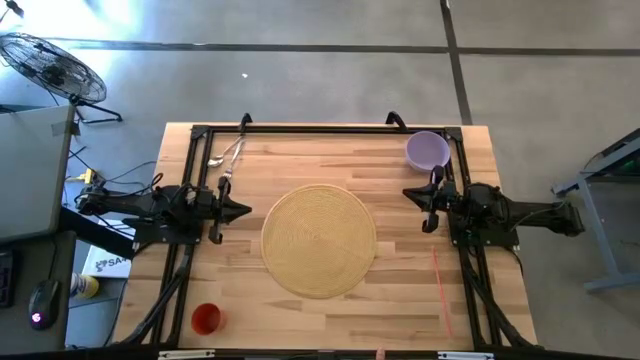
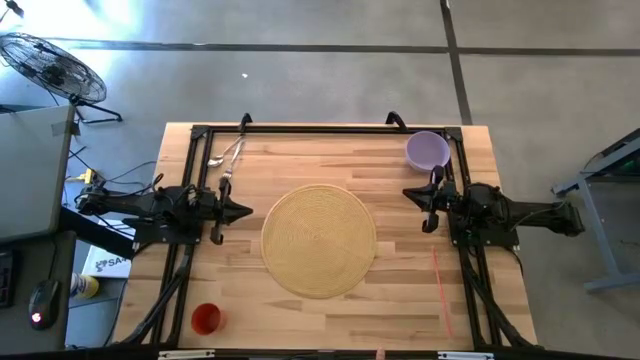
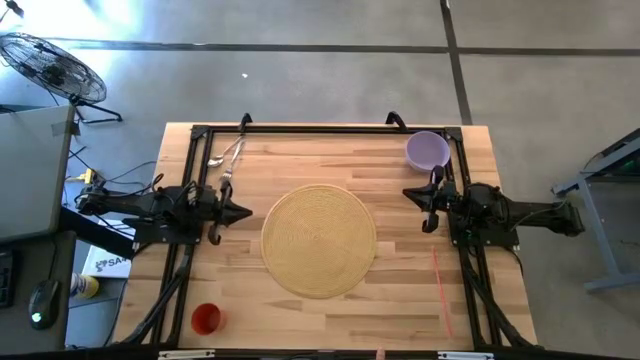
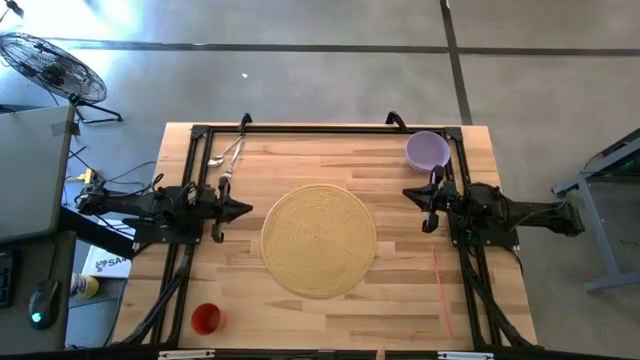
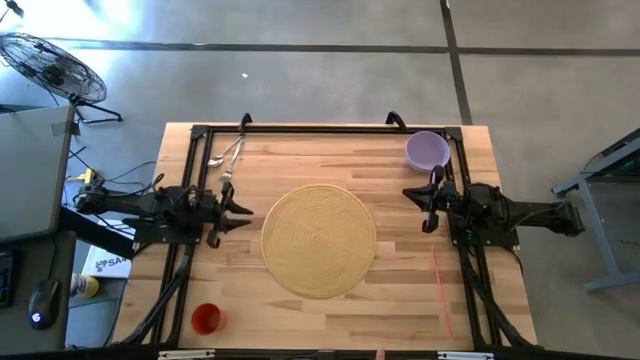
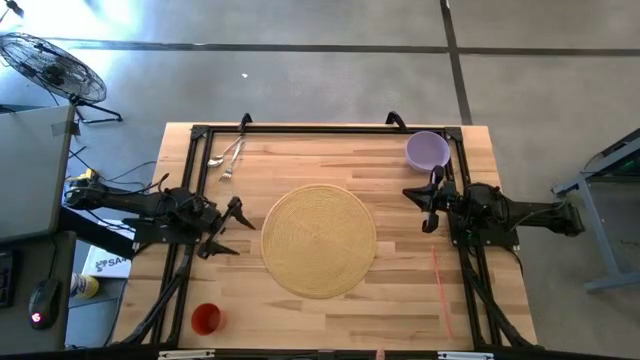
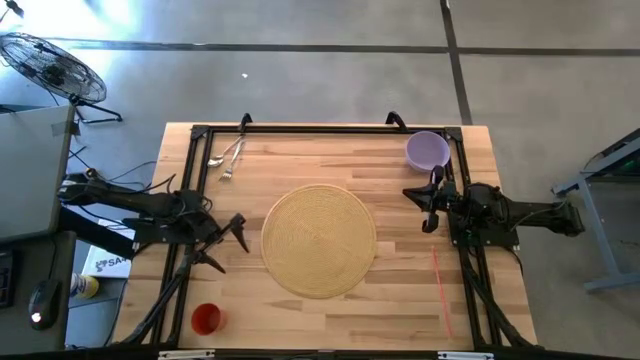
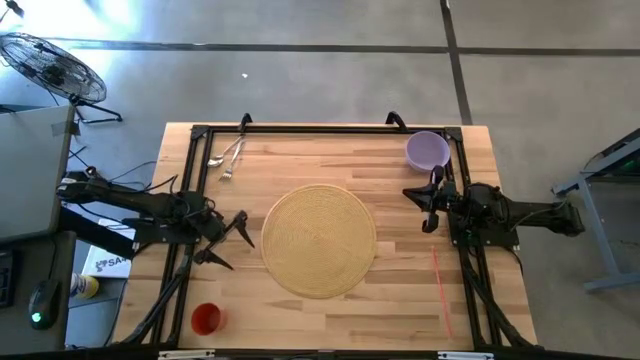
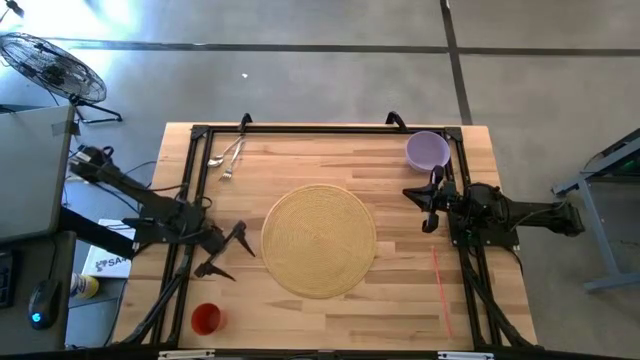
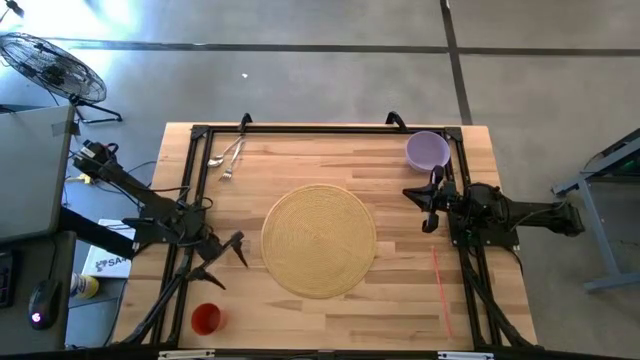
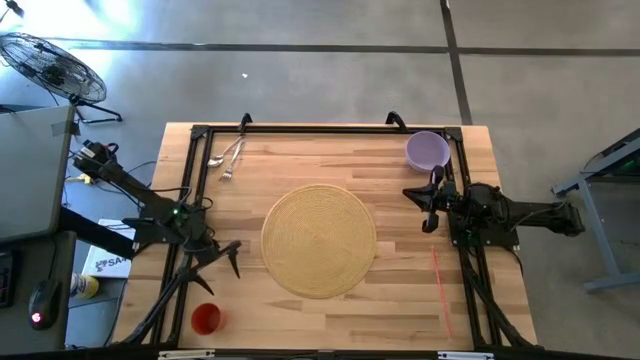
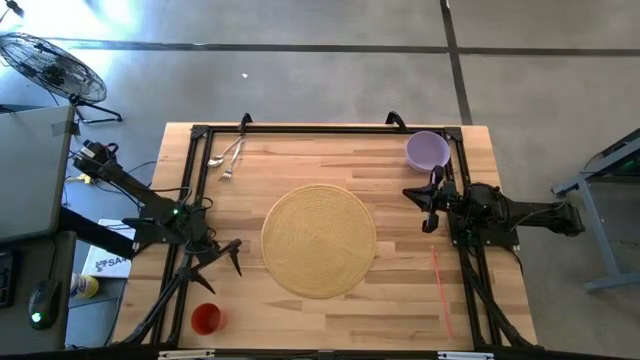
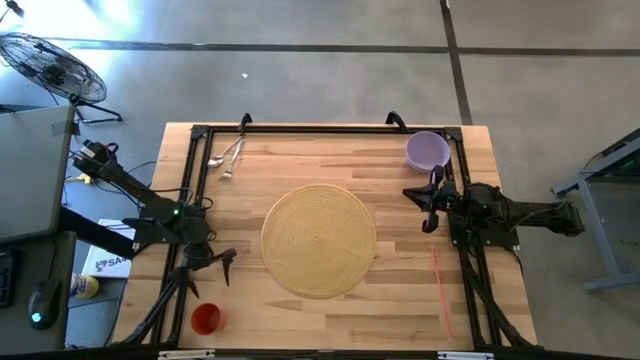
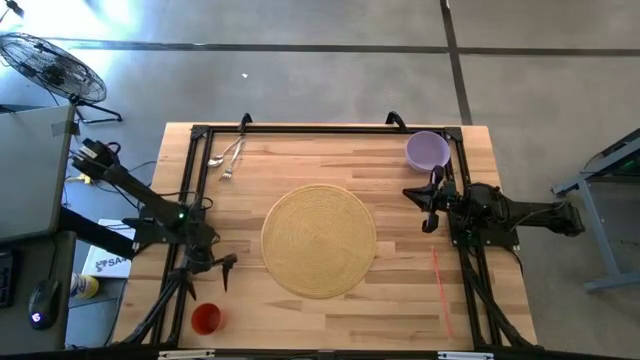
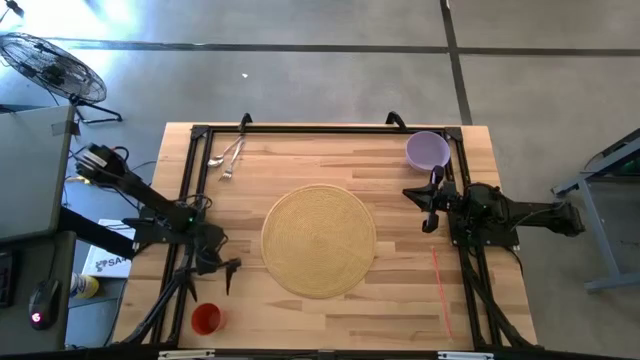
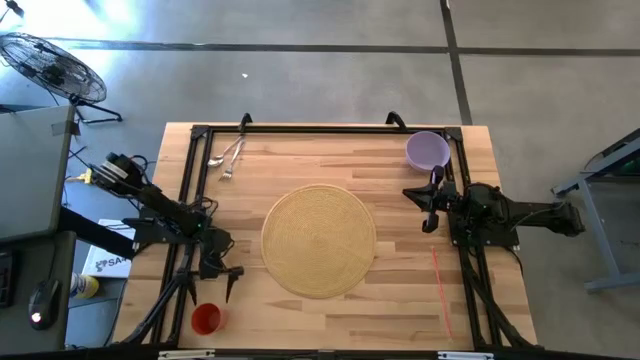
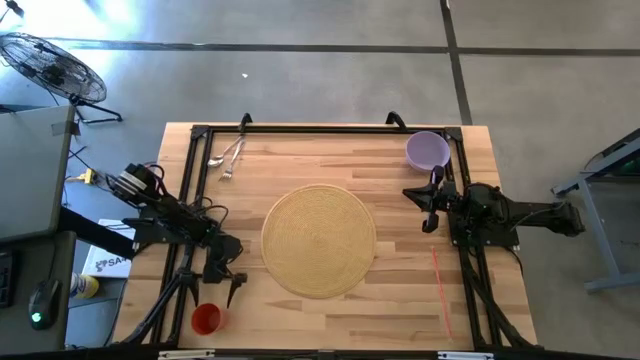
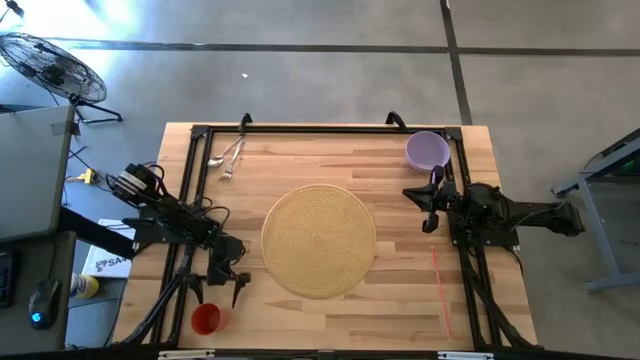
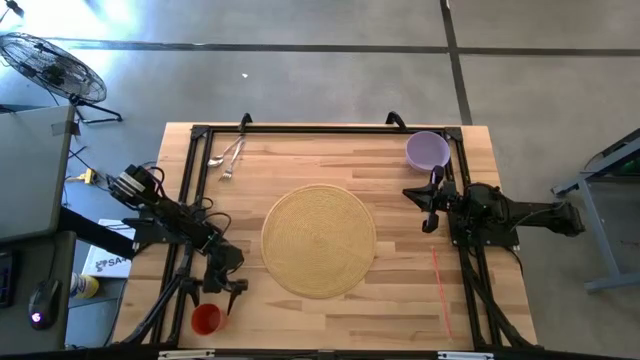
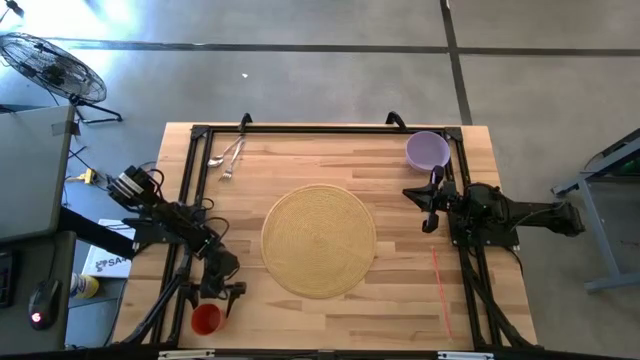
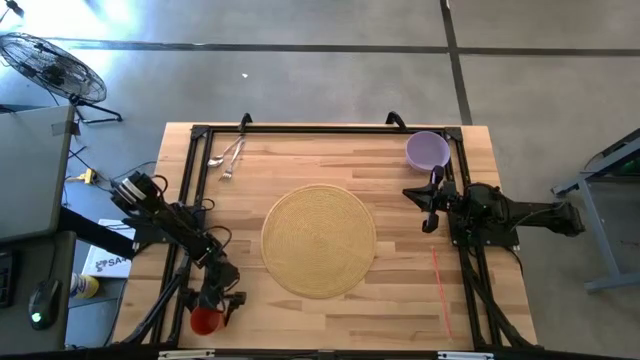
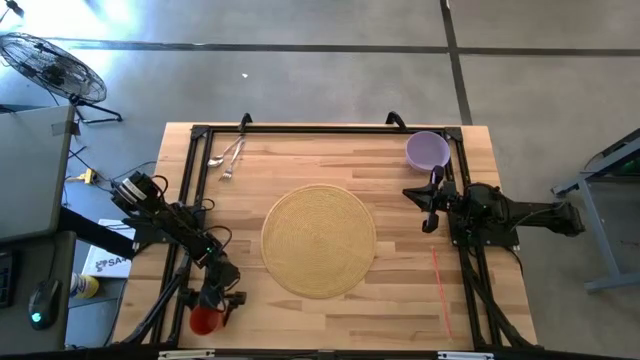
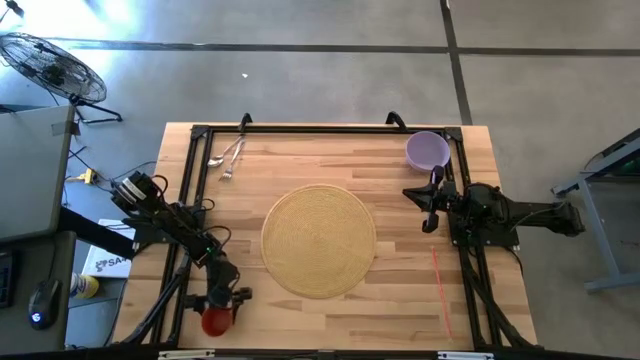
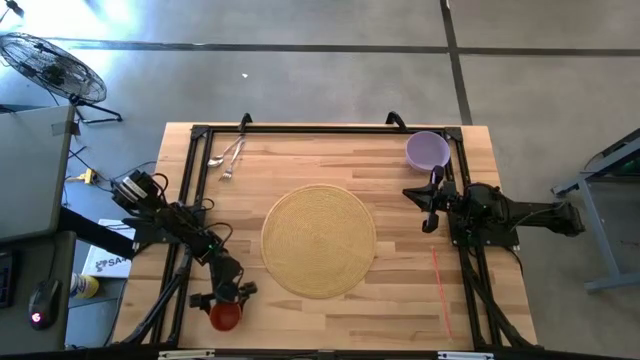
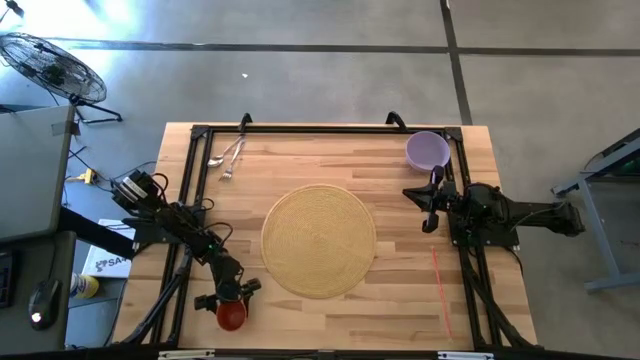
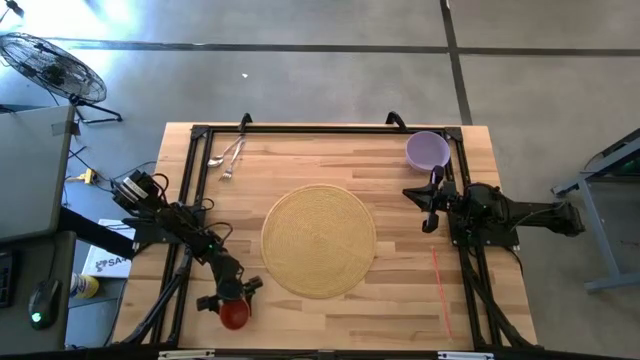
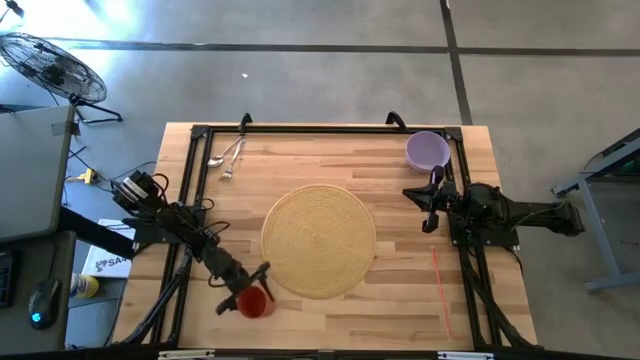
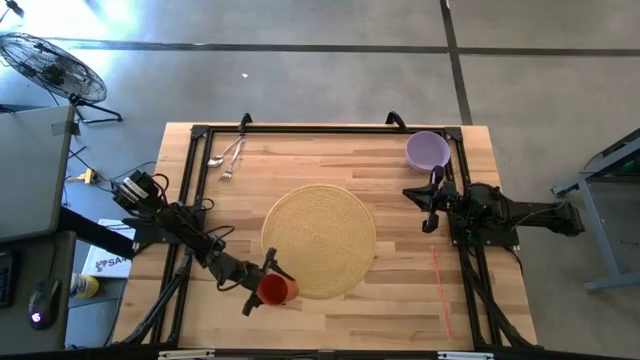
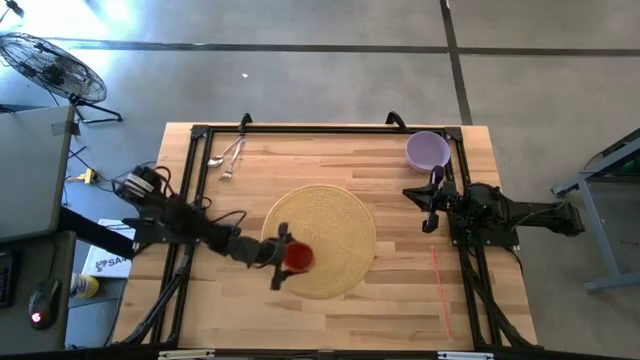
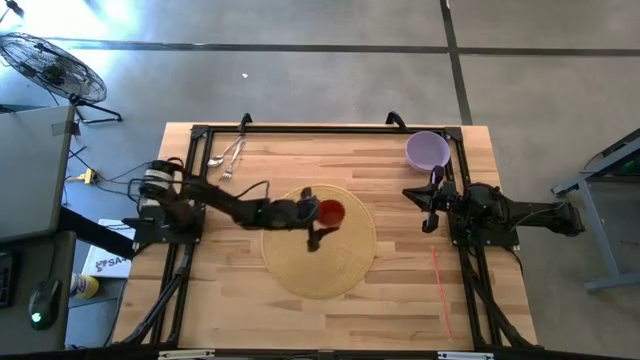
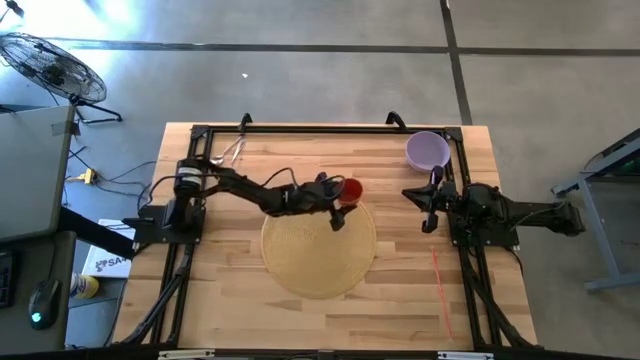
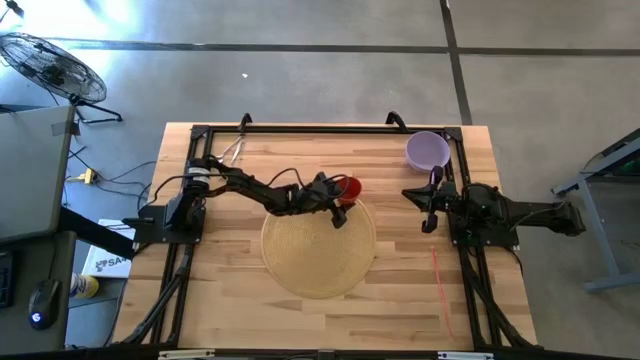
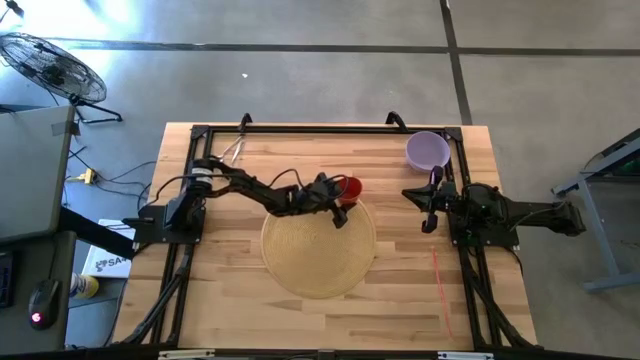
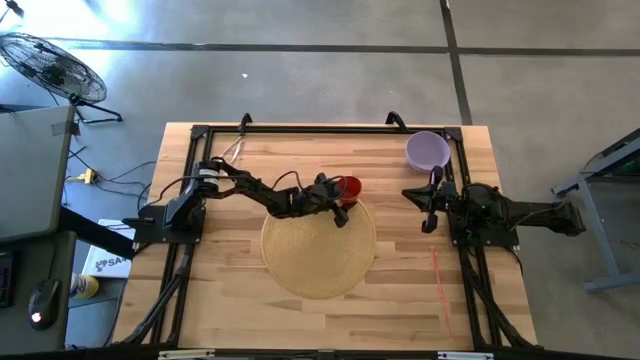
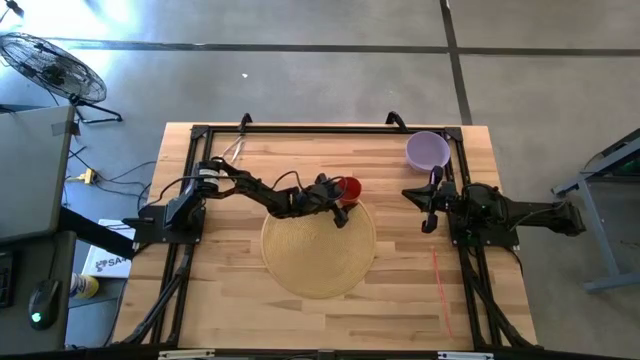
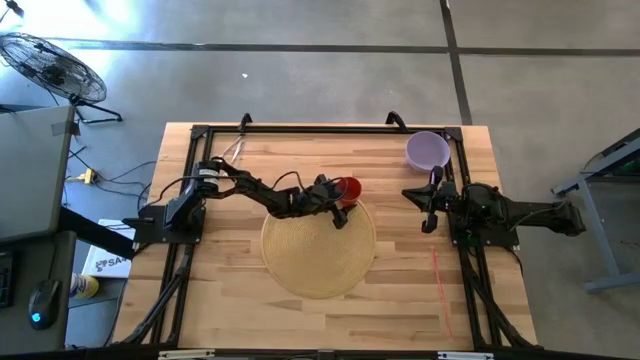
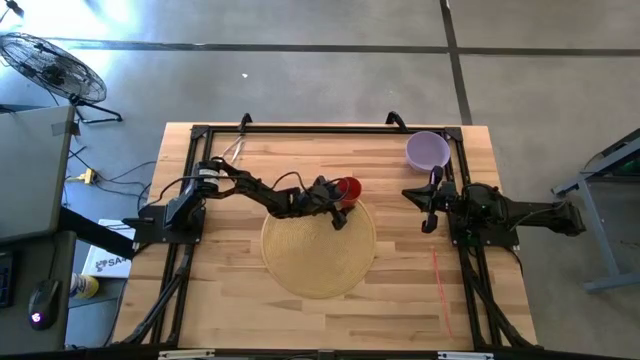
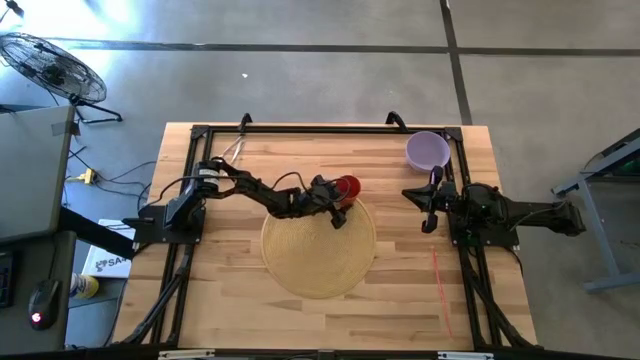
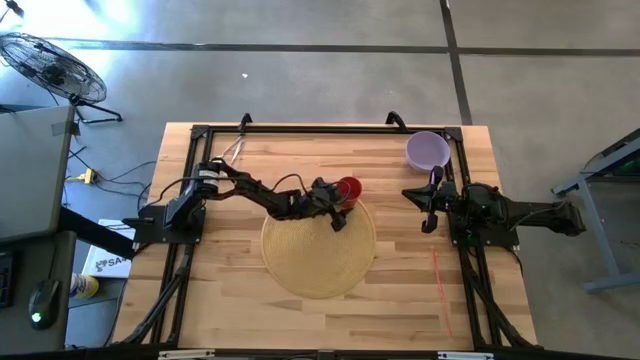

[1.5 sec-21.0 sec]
Task: Pick & Place Utensil
Put the orange cup on the upper right of the placemat
